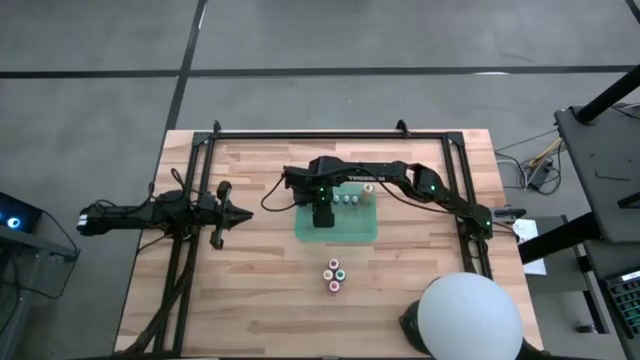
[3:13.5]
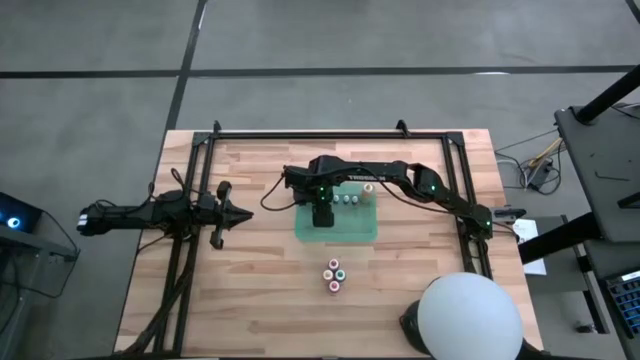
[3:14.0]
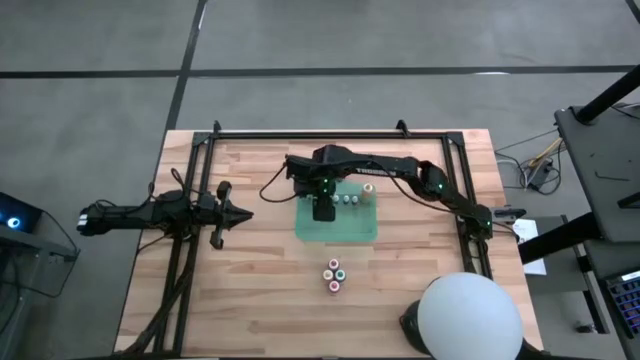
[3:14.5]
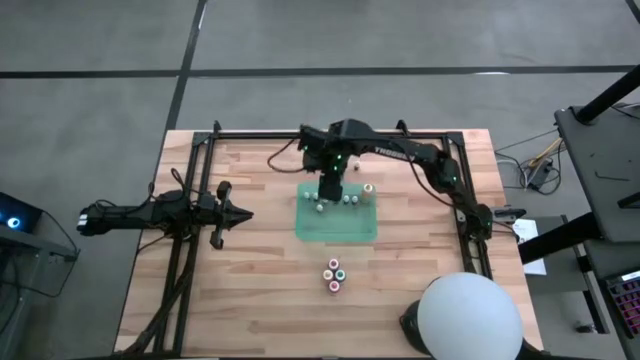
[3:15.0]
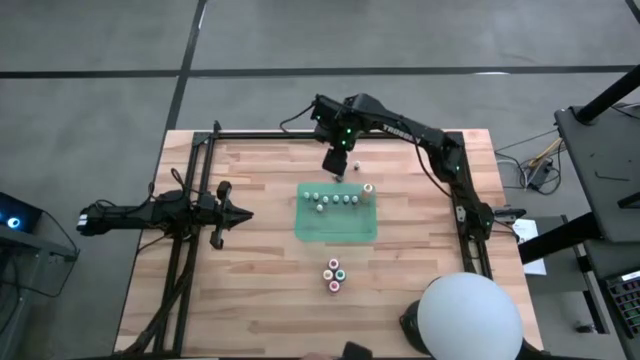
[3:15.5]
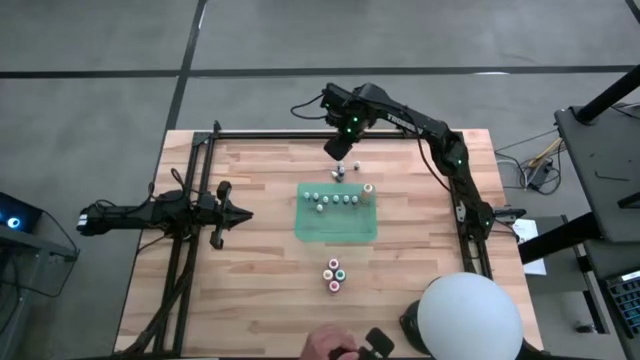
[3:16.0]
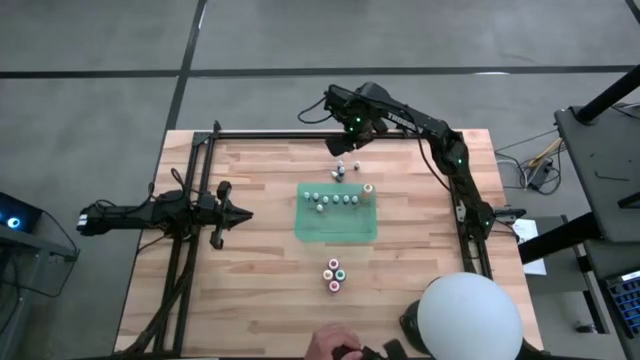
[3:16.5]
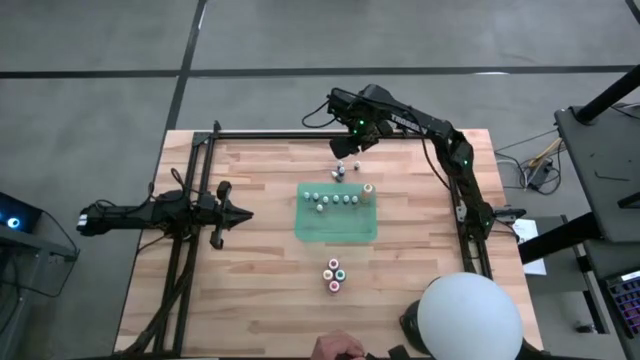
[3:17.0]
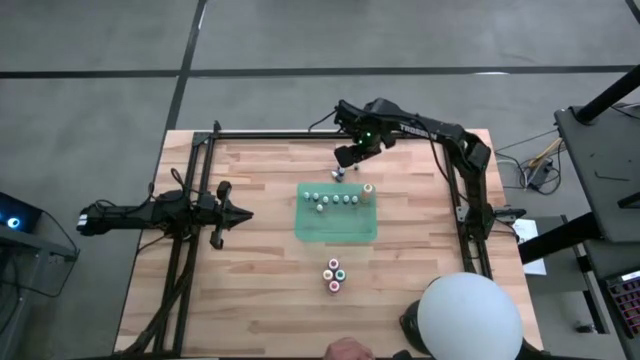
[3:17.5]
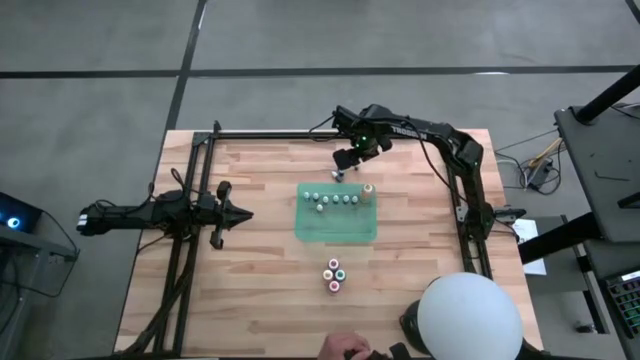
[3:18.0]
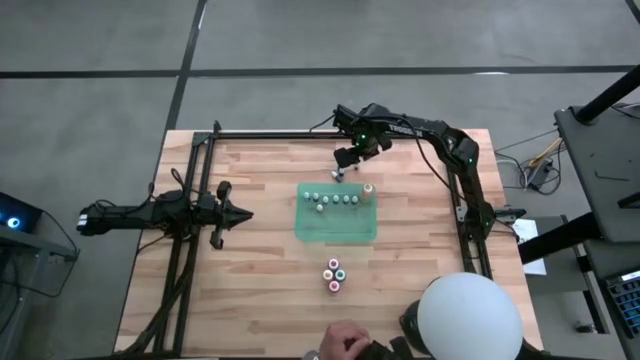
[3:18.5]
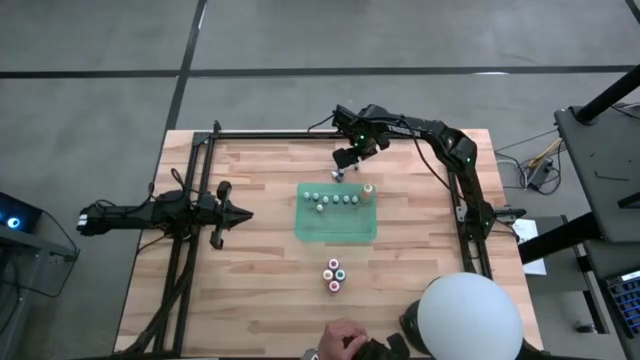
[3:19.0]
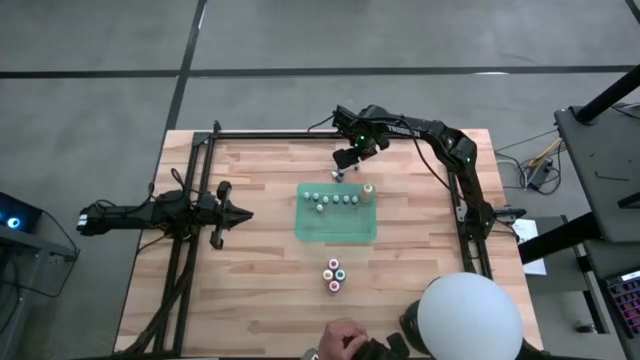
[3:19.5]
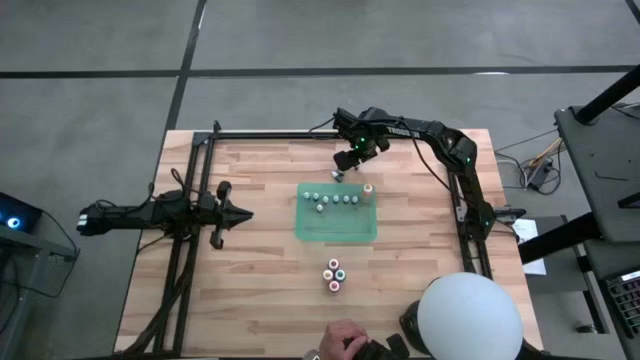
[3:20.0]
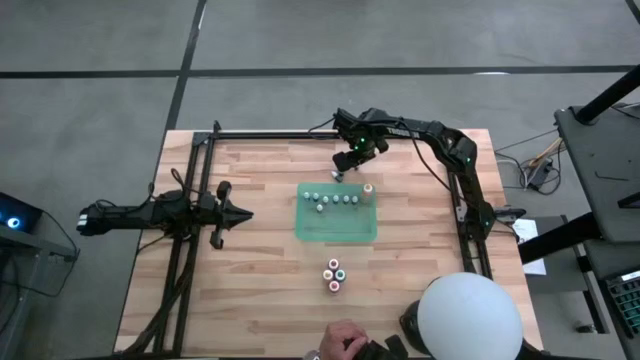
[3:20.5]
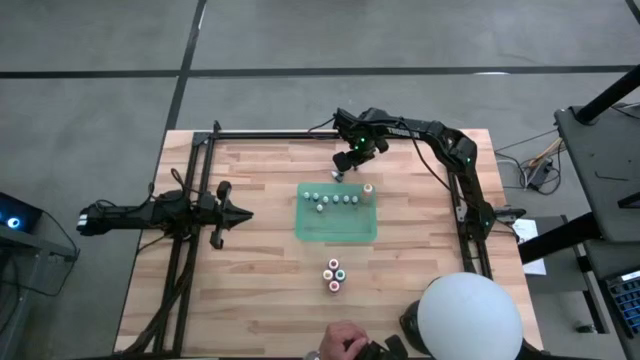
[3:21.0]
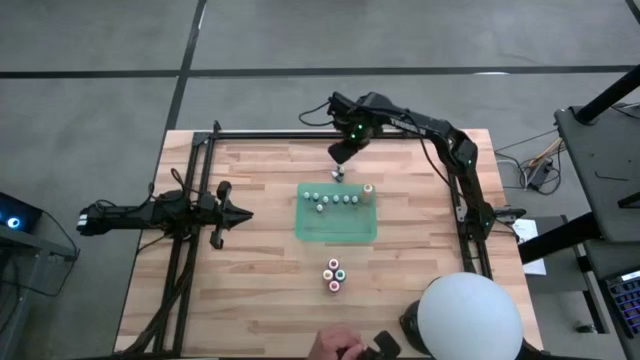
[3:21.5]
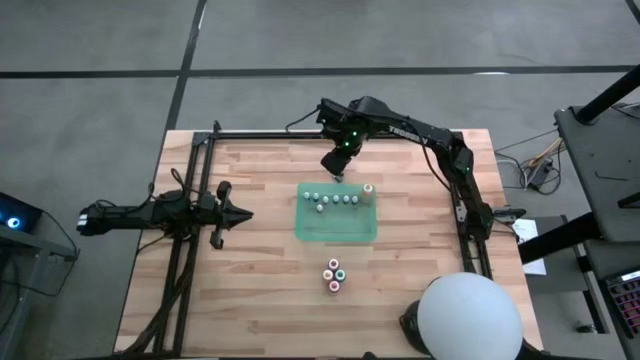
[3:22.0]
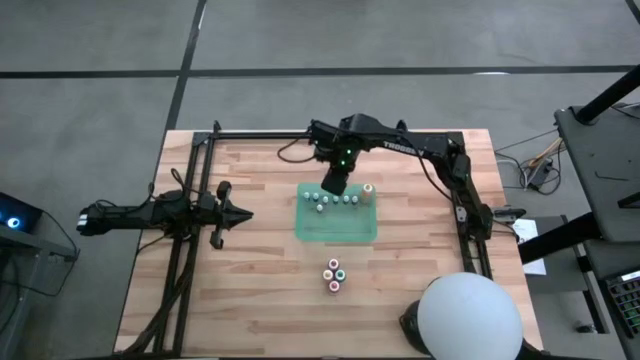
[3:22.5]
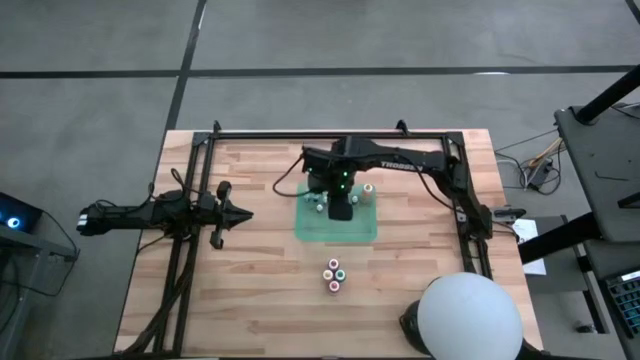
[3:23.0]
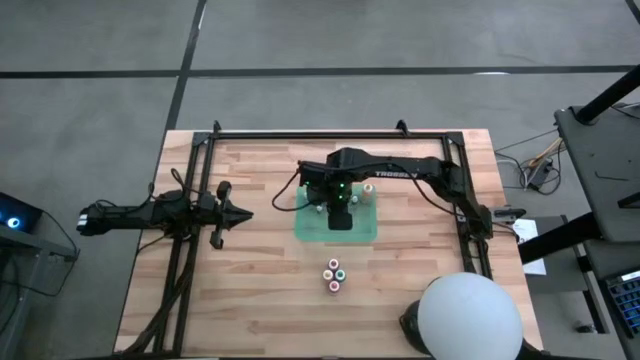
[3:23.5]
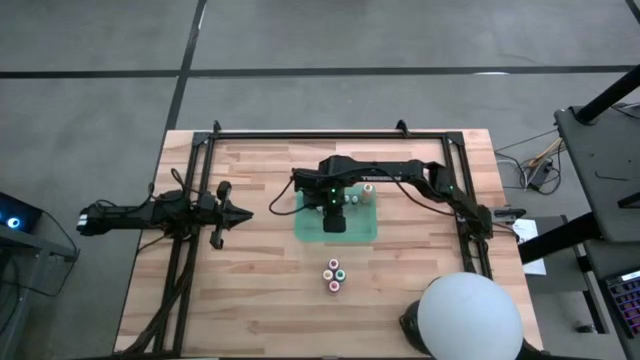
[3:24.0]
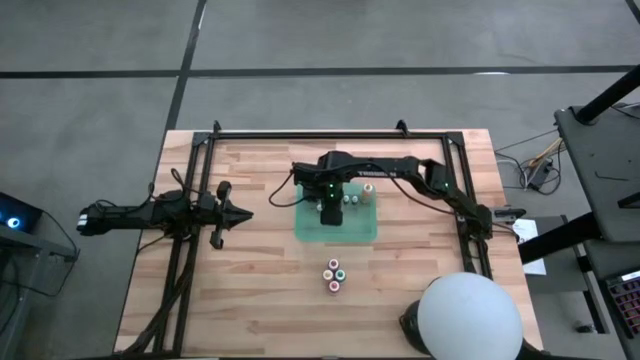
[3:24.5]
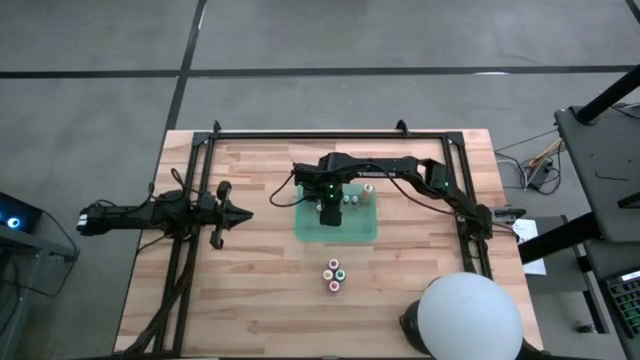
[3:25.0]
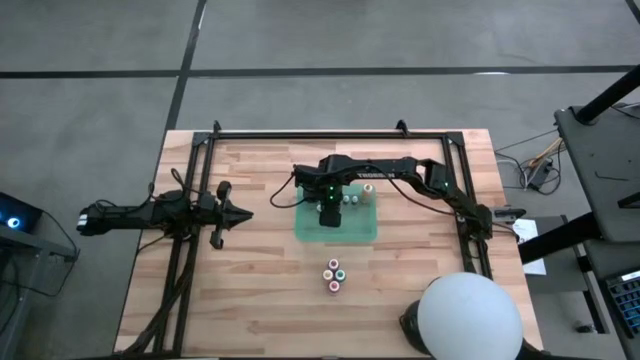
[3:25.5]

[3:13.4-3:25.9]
Task: Pick & Place food coloring
Put the small black food coloring bottle into the green container

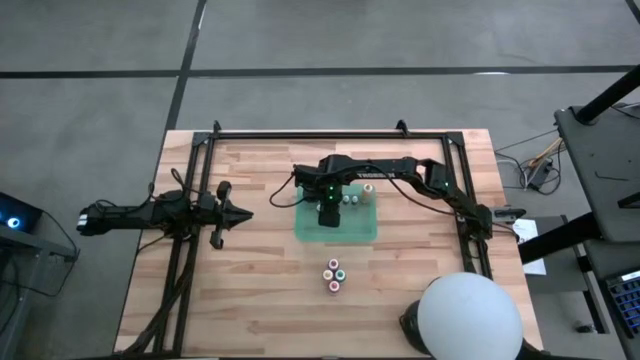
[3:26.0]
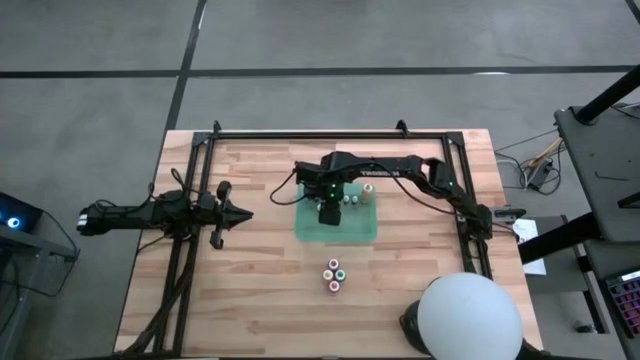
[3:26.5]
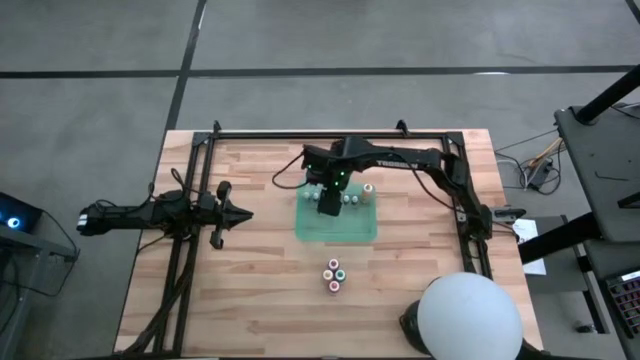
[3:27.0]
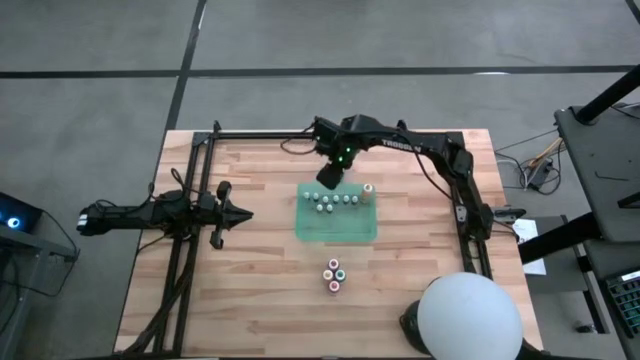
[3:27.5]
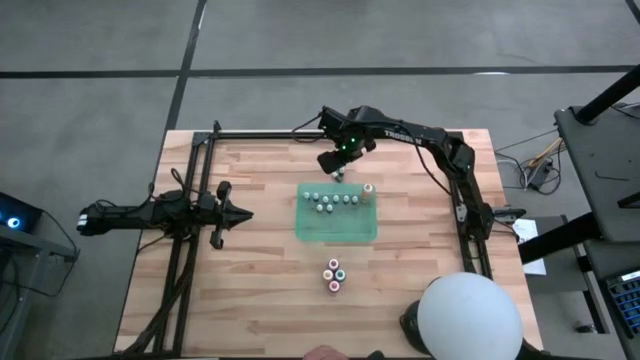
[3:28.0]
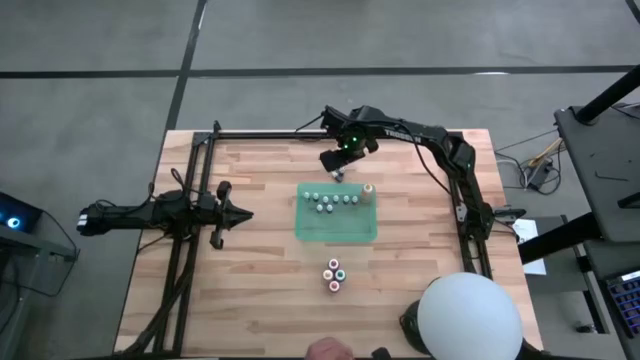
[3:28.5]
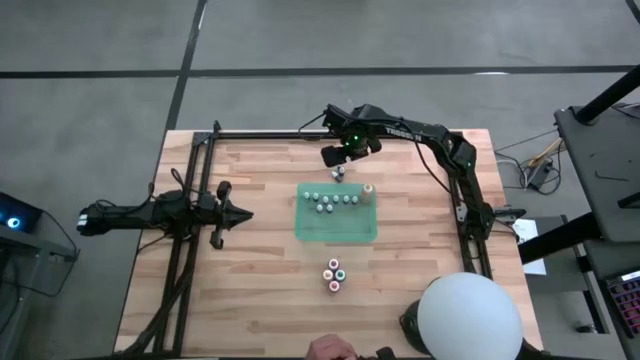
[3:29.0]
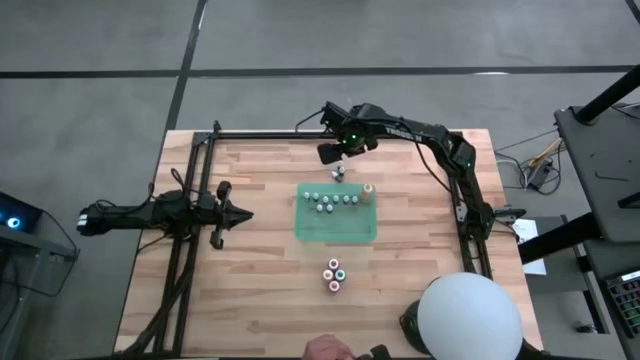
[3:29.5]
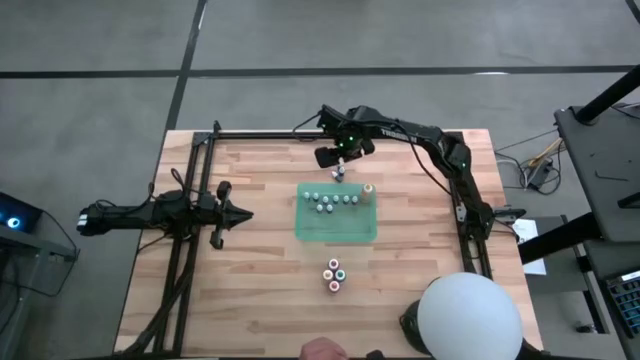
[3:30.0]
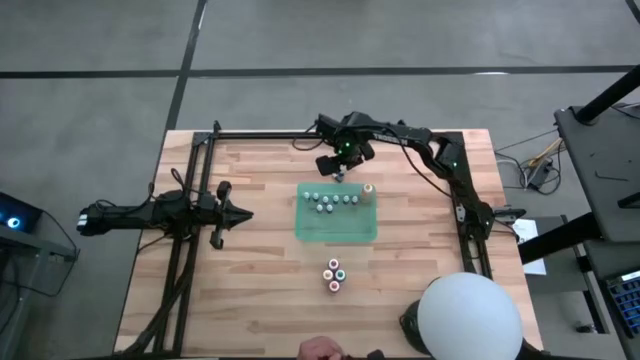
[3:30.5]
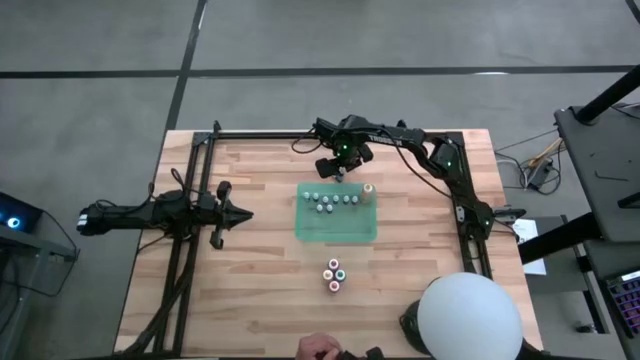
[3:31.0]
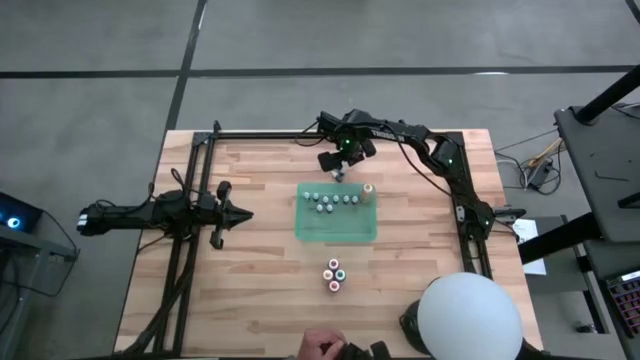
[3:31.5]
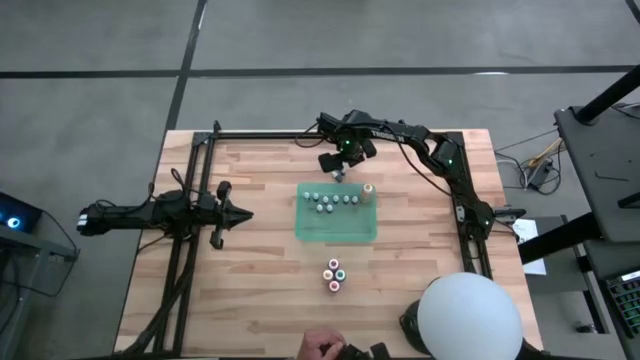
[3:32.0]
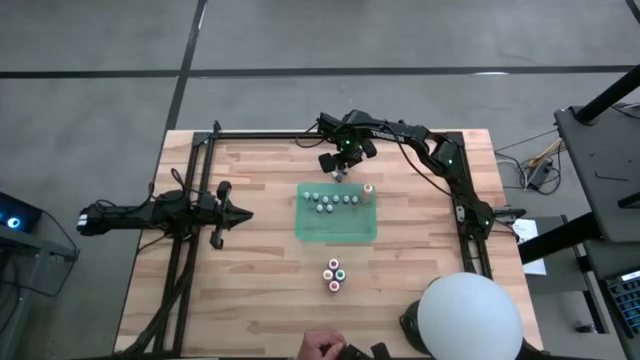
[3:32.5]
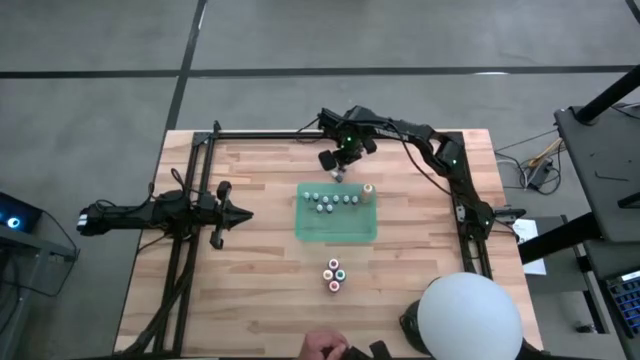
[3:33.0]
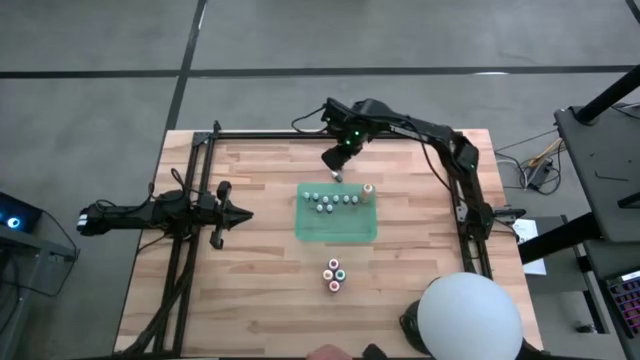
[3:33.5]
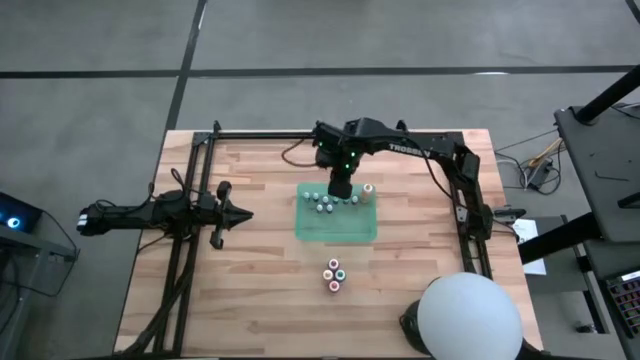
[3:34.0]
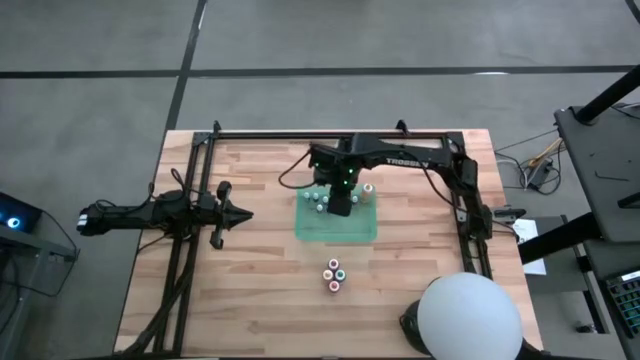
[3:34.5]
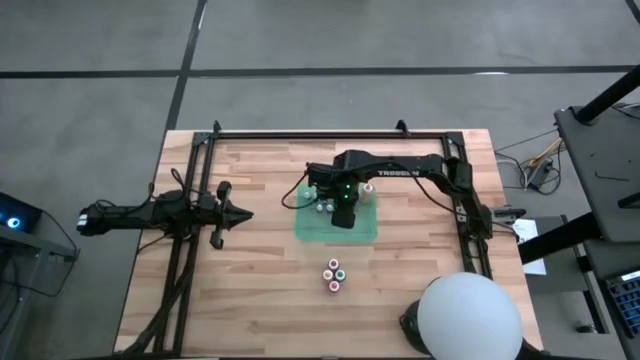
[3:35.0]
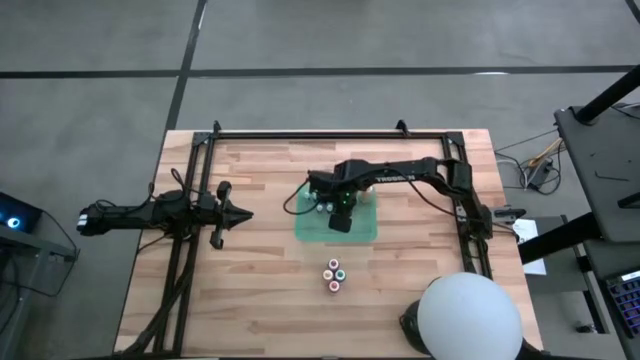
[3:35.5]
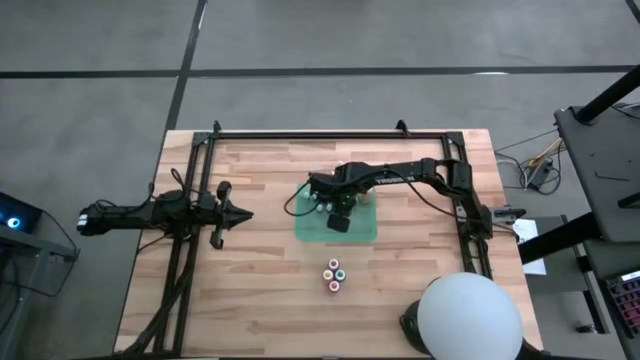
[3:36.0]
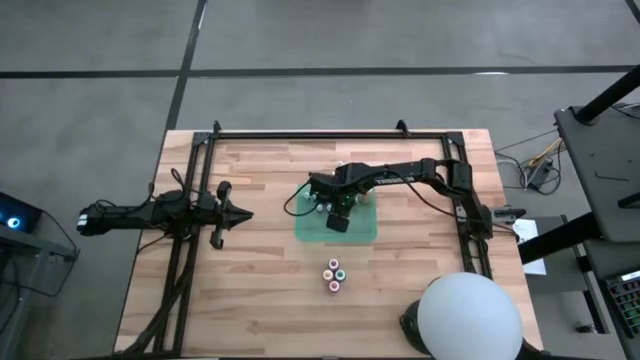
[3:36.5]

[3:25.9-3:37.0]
Put the small black food coloring bottle into the green container
